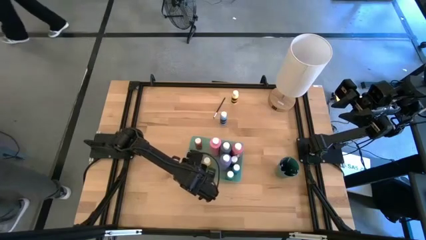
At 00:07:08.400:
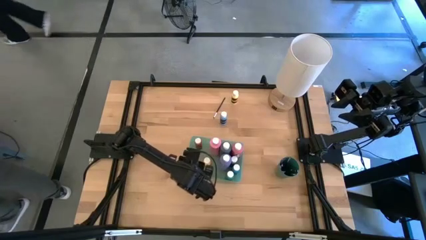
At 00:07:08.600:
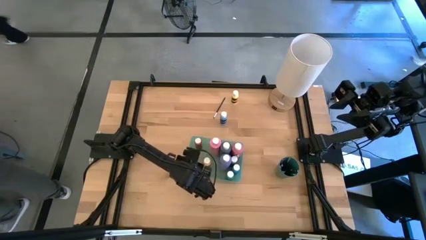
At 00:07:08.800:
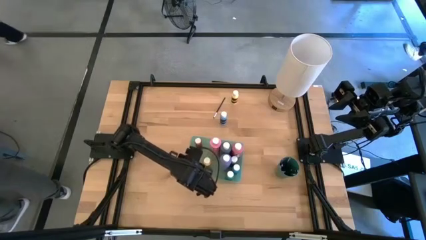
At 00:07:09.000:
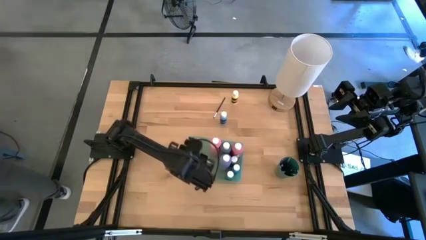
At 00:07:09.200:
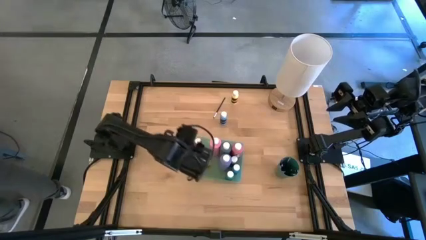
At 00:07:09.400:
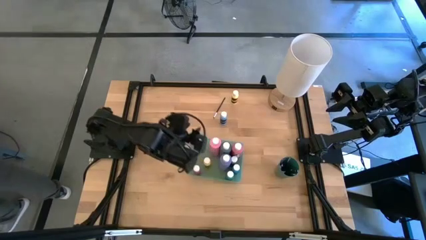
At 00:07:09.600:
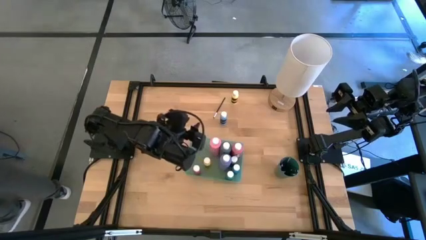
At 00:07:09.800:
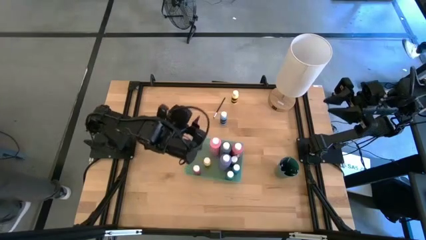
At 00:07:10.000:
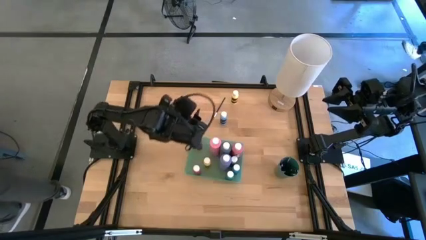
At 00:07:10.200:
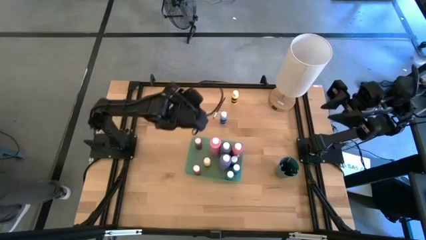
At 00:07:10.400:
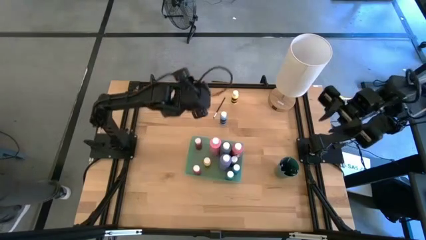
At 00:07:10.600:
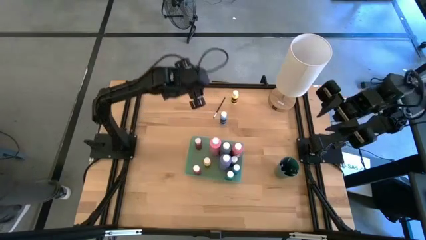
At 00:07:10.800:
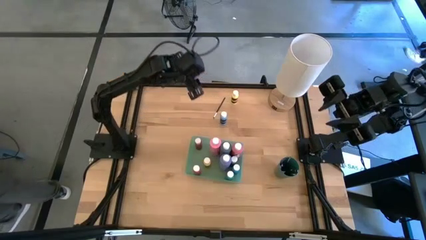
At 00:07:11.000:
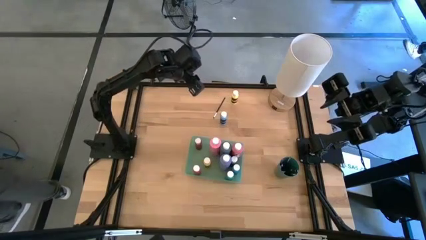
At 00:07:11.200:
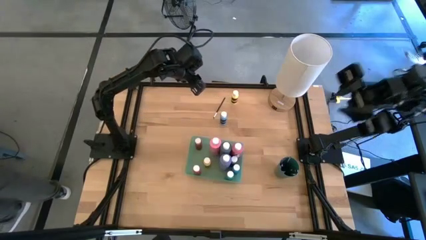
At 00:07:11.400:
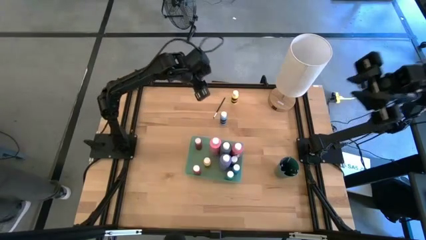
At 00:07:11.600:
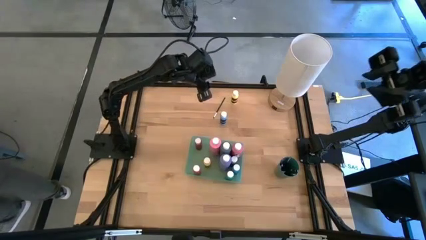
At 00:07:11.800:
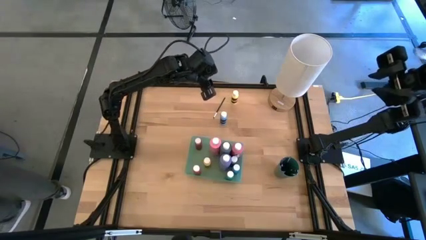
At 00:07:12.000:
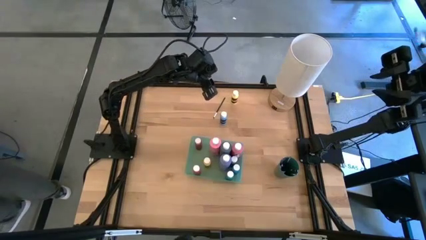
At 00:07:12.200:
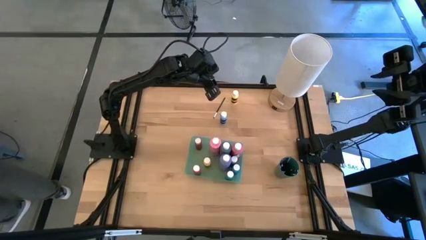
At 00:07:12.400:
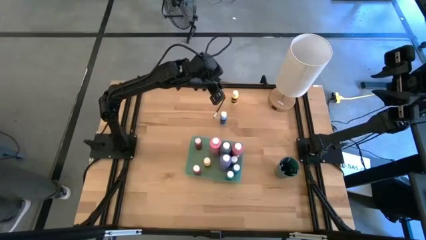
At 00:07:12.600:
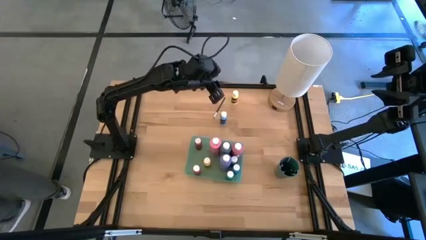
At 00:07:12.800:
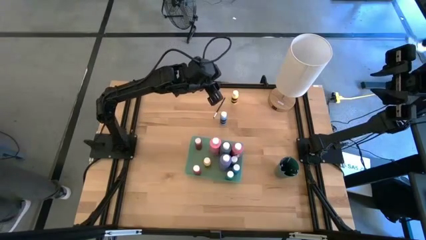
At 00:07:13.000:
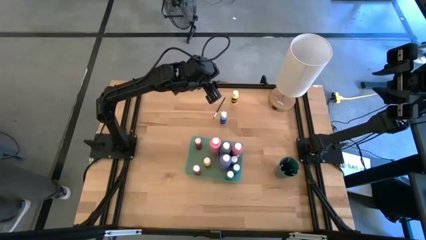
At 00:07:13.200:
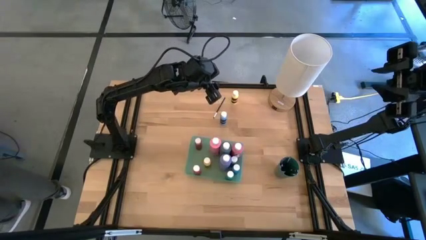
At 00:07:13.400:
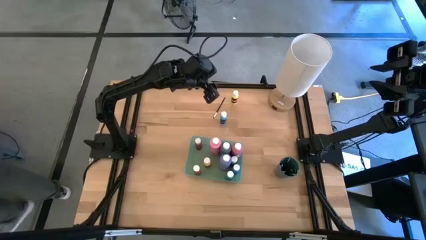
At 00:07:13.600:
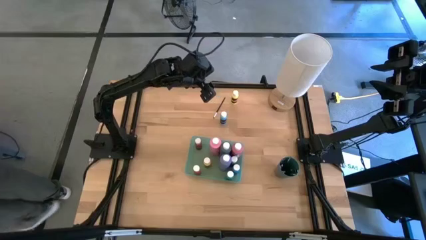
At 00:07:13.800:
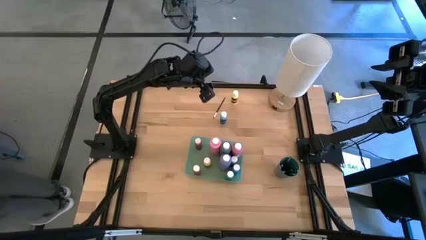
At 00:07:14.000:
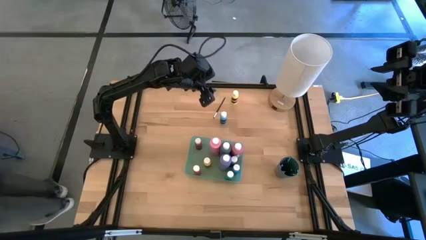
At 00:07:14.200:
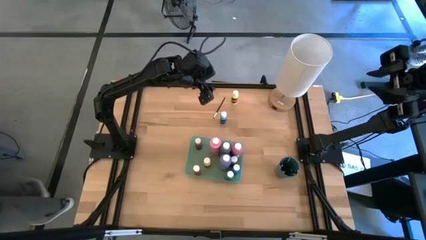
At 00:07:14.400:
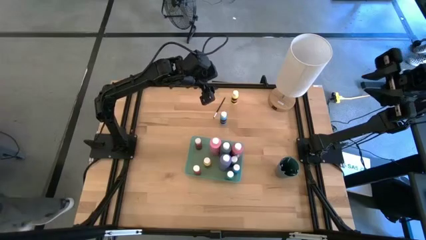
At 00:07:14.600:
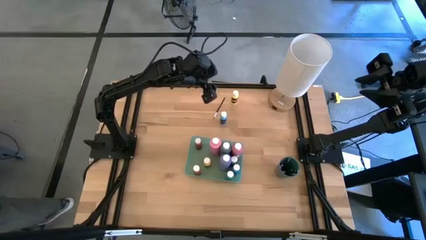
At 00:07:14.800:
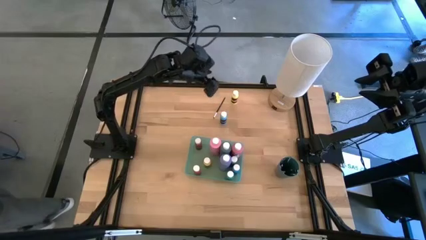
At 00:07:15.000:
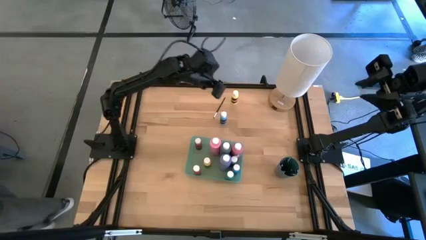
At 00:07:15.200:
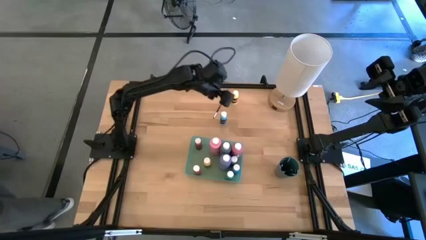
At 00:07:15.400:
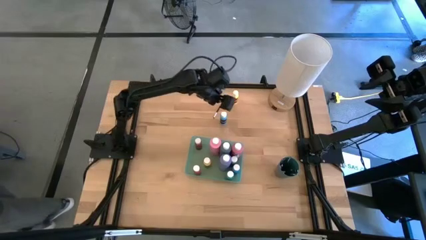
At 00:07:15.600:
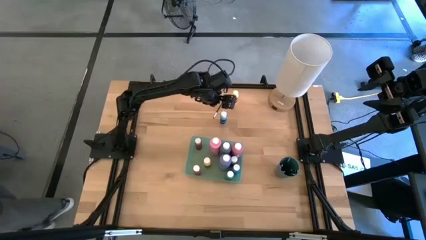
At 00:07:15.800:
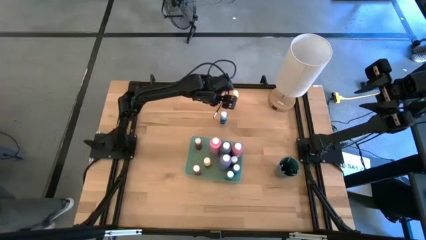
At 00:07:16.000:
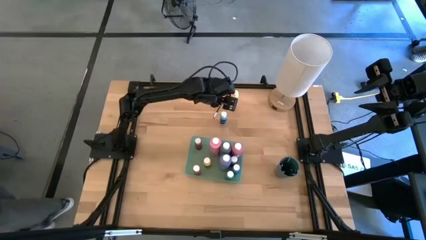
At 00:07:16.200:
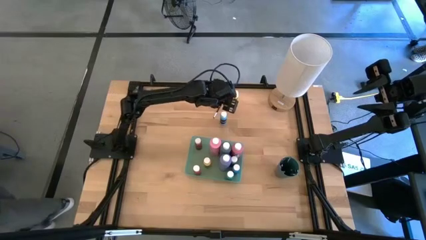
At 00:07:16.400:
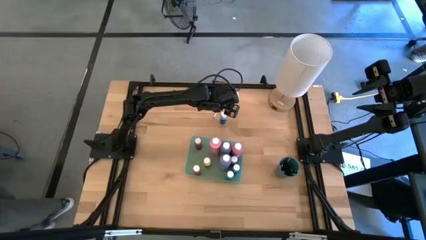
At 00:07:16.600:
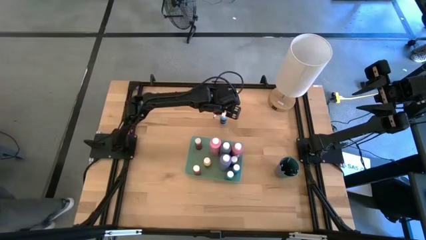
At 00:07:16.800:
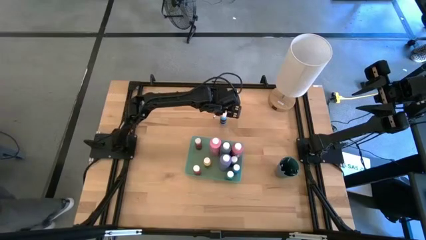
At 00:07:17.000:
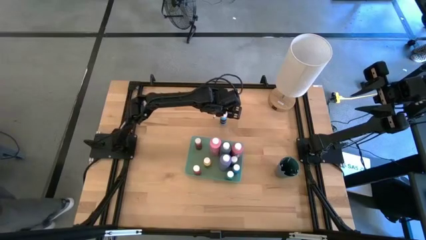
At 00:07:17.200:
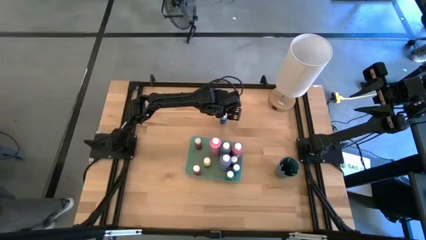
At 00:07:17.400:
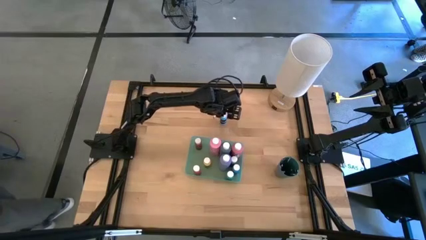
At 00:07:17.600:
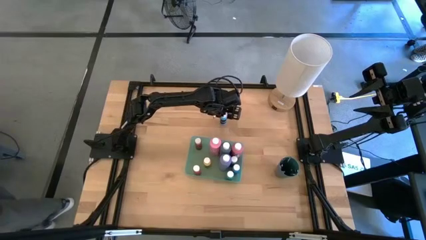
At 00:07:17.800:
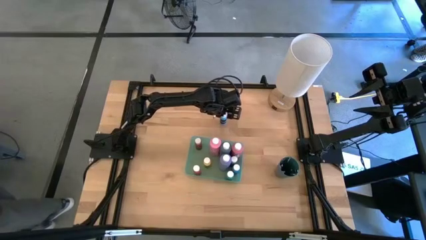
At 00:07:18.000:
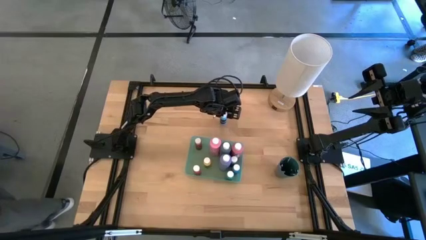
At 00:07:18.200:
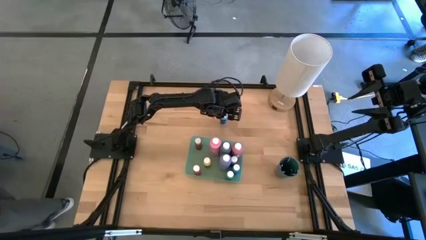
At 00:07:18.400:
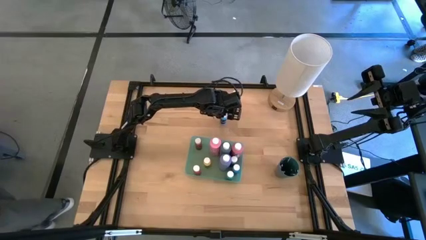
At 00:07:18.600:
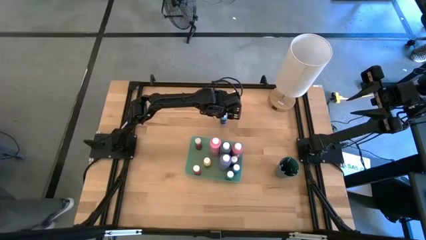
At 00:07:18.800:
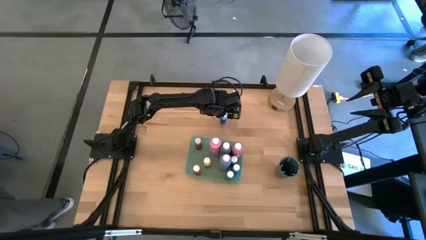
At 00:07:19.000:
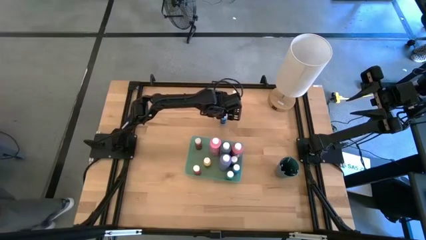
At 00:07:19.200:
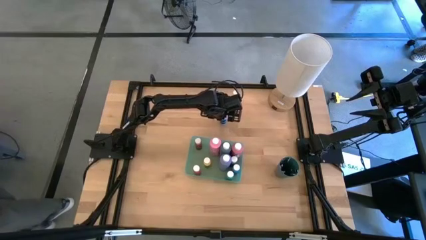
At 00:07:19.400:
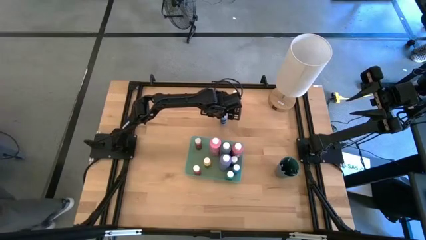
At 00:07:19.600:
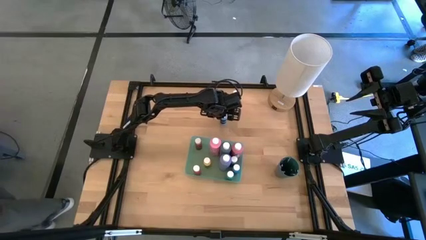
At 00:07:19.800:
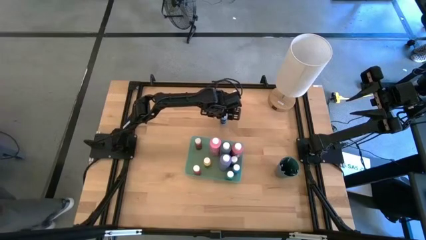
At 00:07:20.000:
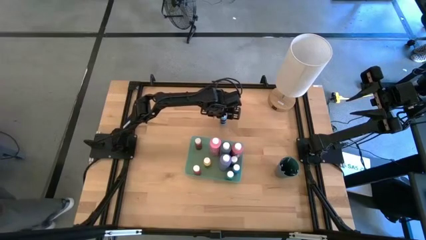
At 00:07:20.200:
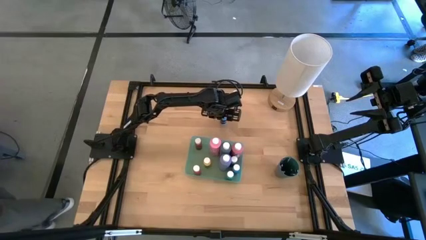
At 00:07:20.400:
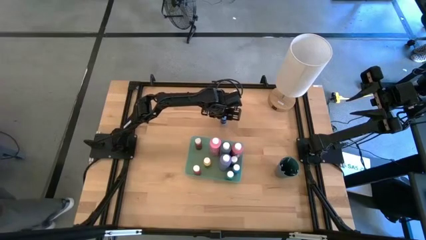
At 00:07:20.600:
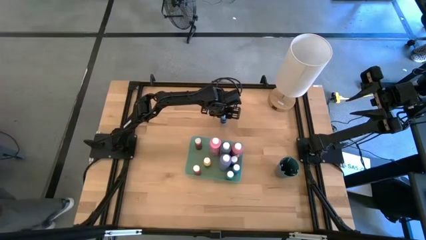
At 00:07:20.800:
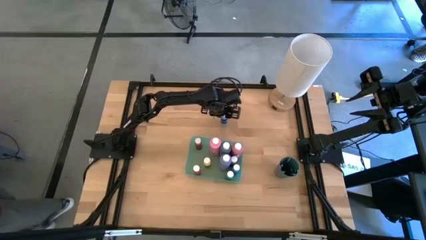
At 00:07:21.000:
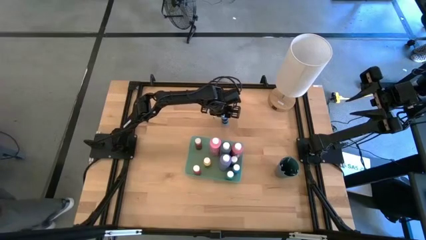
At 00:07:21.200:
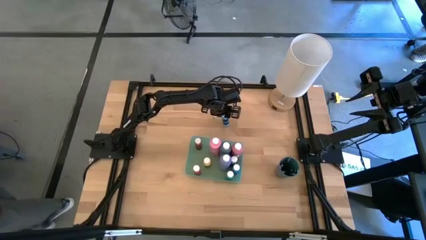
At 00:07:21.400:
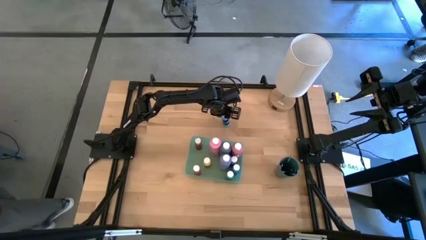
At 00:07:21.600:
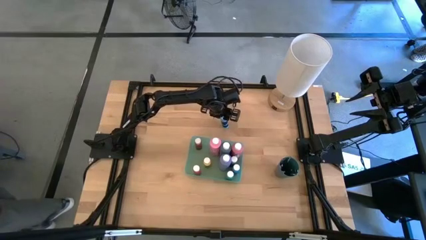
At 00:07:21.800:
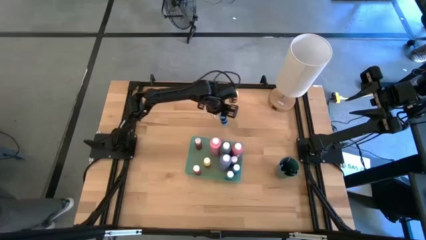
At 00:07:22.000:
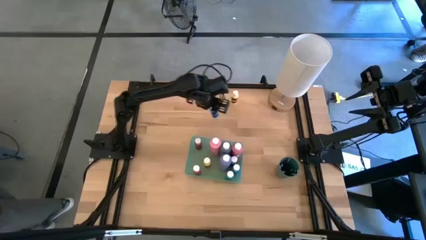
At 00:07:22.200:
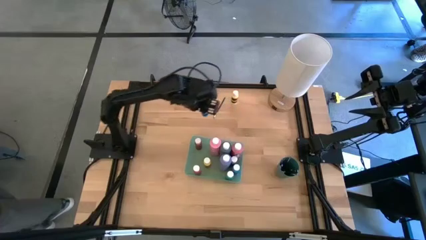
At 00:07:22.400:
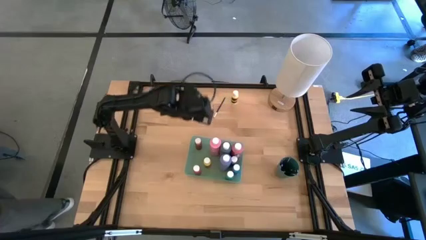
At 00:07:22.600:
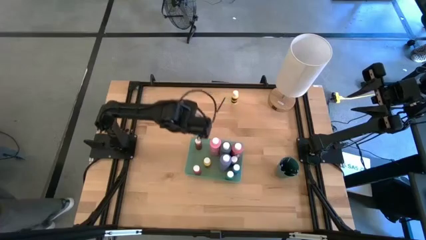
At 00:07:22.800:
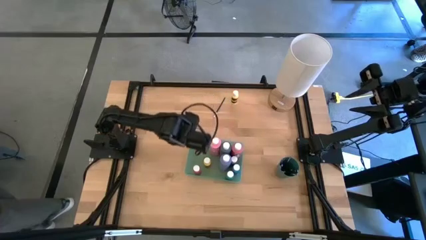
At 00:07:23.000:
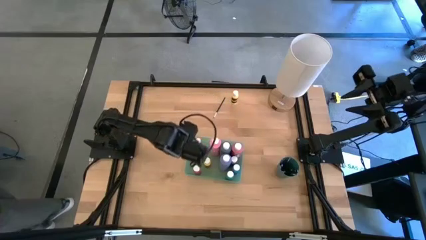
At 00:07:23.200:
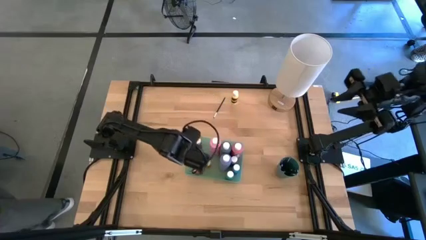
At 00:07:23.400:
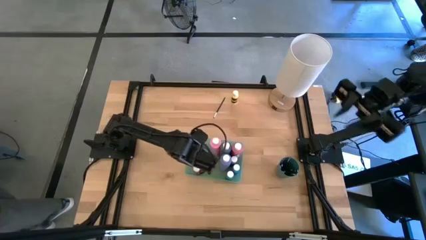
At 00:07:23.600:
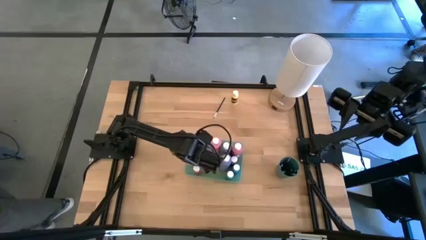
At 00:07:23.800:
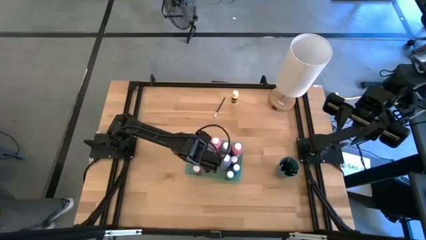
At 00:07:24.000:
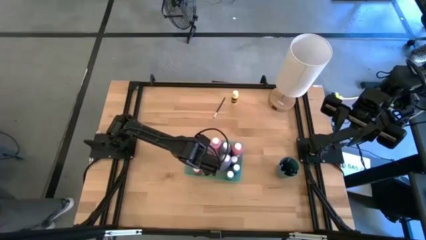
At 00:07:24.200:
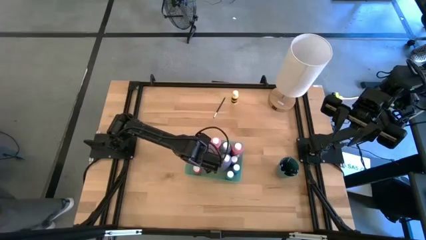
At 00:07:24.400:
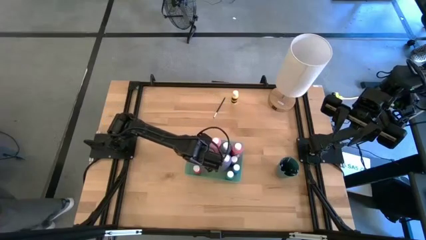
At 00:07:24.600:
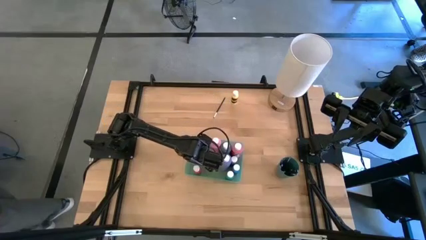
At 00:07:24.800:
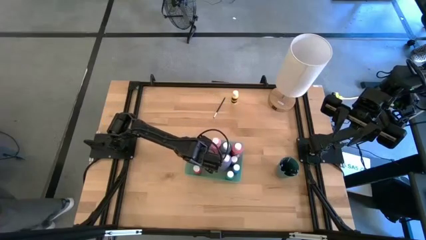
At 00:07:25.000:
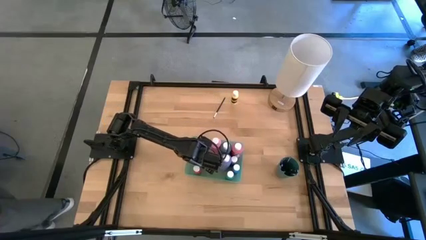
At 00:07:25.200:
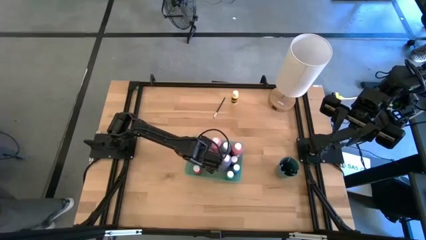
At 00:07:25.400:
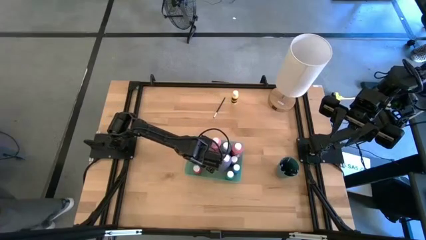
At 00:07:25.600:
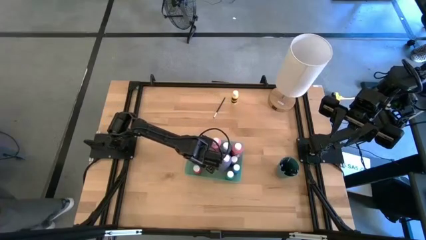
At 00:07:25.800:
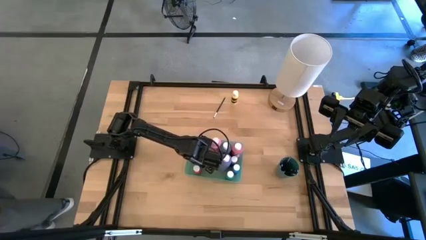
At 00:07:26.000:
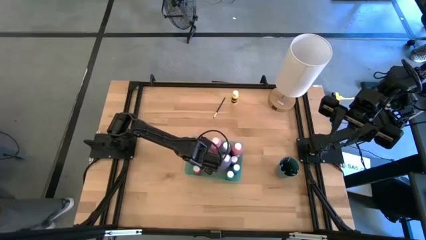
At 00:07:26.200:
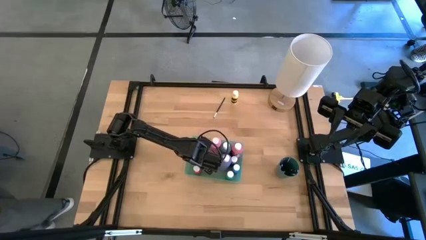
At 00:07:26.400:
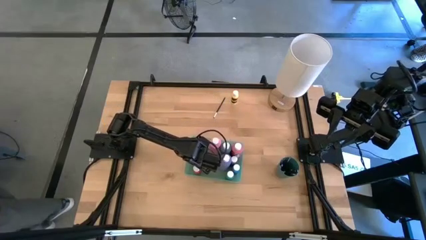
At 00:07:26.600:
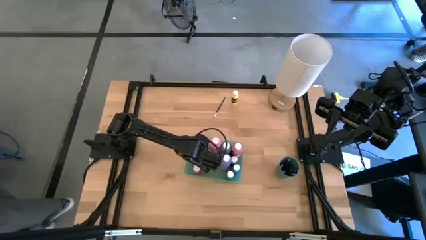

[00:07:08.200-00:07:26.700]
Task: Pick & Place Paint Supplies
Put the small blue paint bottle into the light green bin
